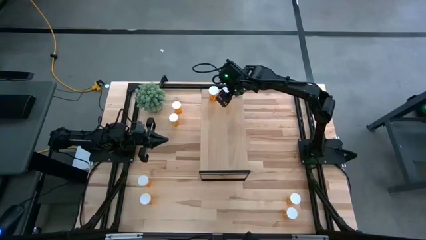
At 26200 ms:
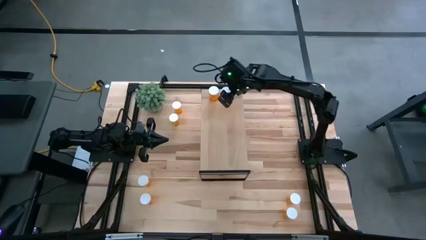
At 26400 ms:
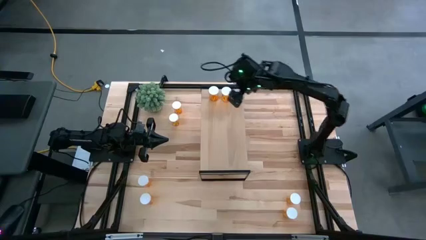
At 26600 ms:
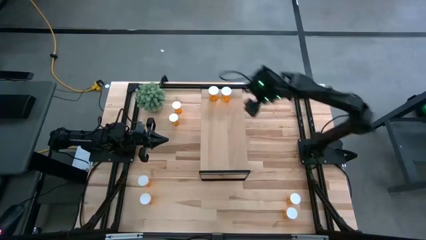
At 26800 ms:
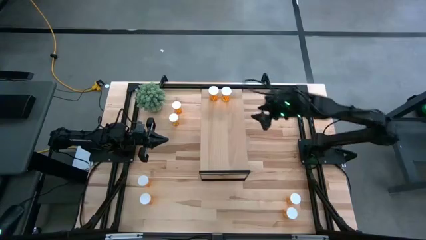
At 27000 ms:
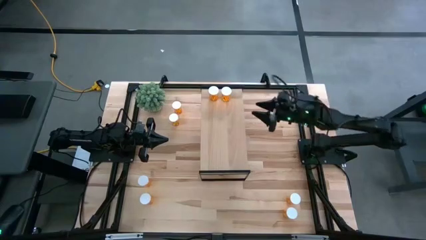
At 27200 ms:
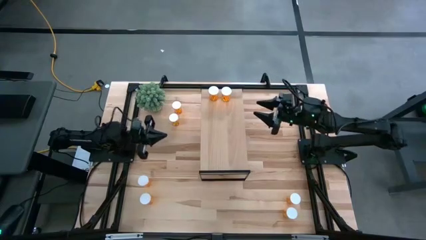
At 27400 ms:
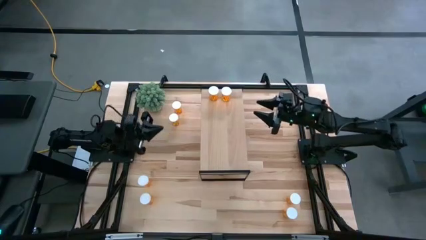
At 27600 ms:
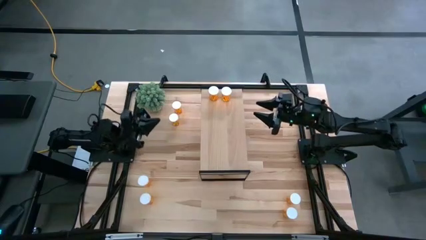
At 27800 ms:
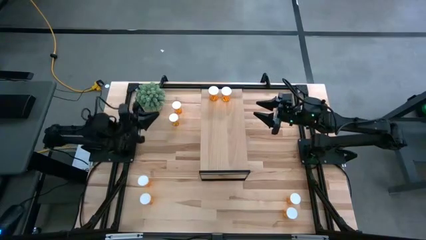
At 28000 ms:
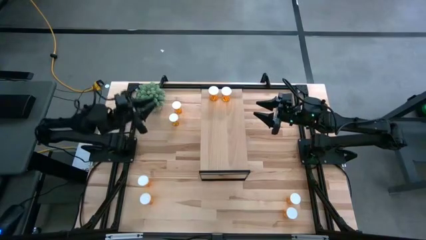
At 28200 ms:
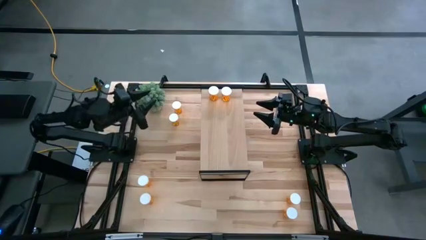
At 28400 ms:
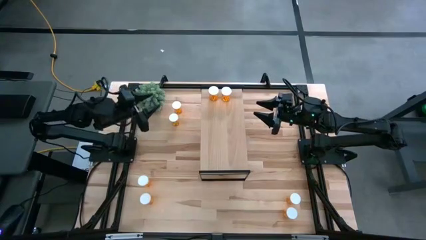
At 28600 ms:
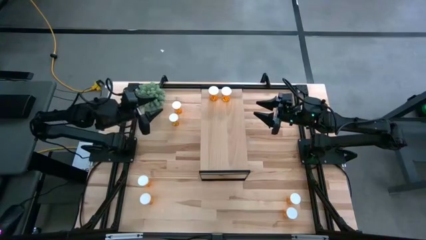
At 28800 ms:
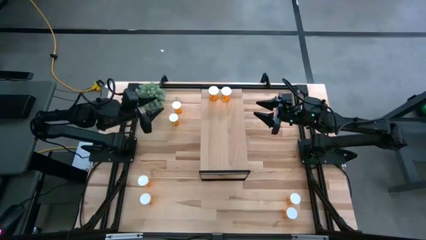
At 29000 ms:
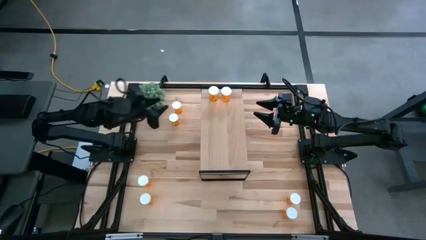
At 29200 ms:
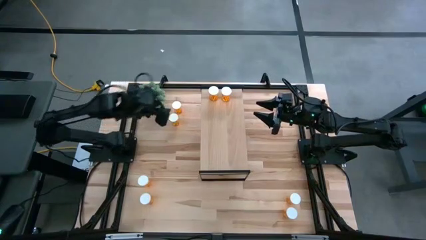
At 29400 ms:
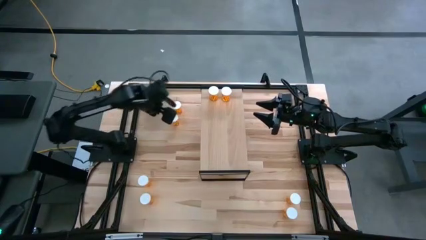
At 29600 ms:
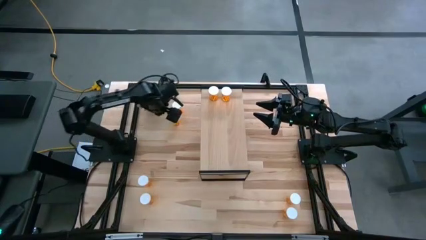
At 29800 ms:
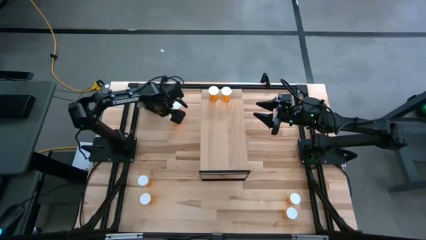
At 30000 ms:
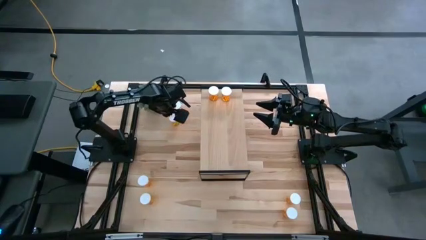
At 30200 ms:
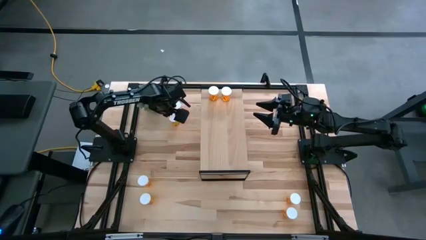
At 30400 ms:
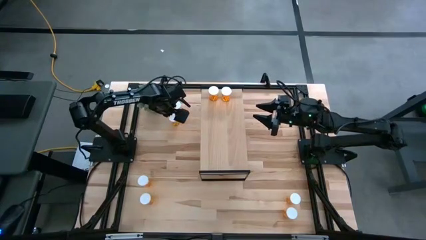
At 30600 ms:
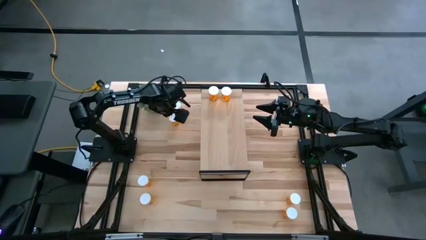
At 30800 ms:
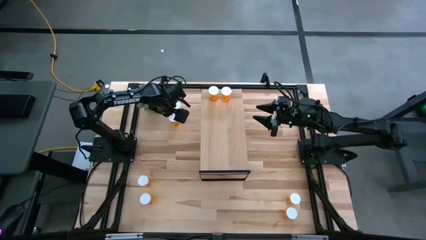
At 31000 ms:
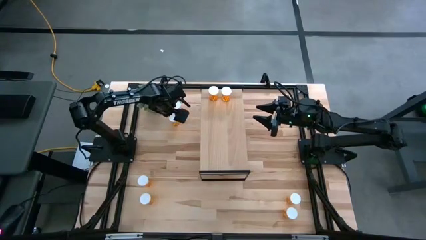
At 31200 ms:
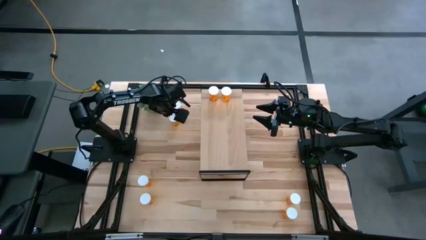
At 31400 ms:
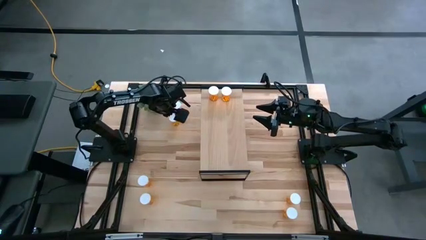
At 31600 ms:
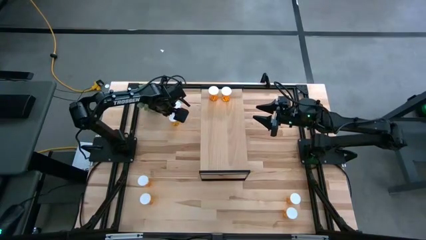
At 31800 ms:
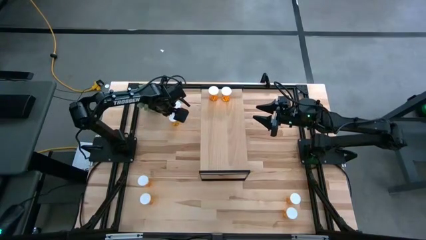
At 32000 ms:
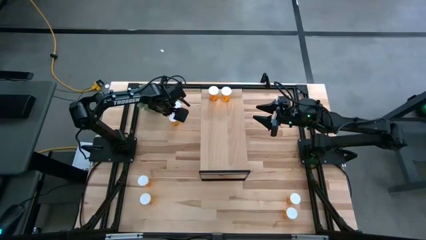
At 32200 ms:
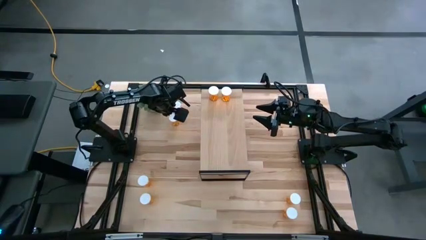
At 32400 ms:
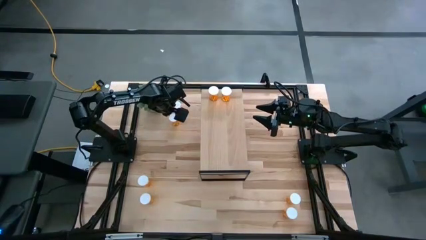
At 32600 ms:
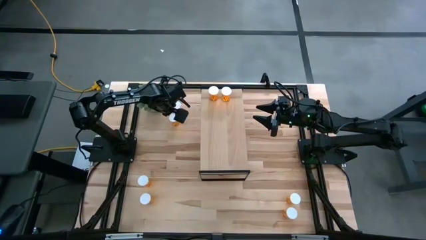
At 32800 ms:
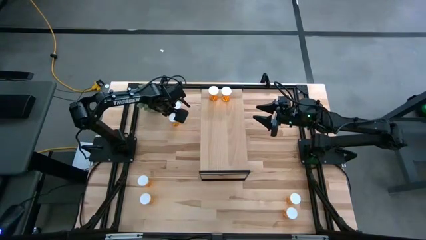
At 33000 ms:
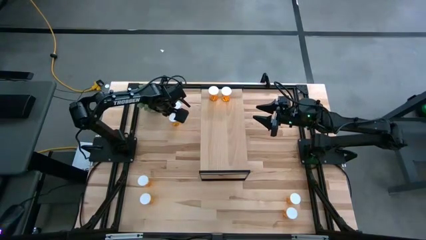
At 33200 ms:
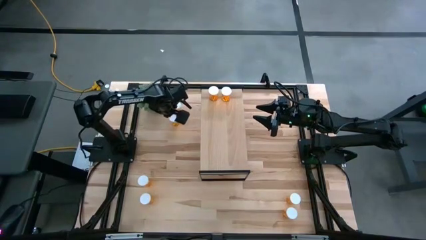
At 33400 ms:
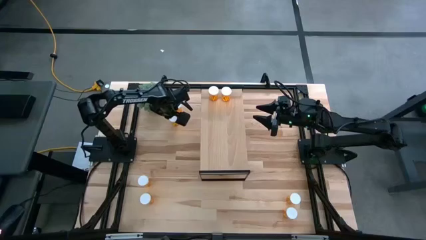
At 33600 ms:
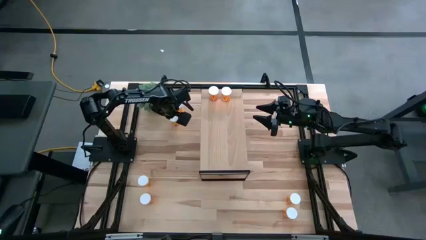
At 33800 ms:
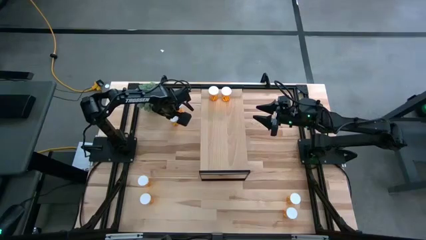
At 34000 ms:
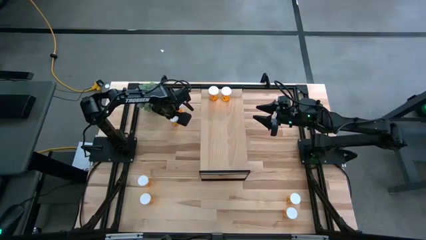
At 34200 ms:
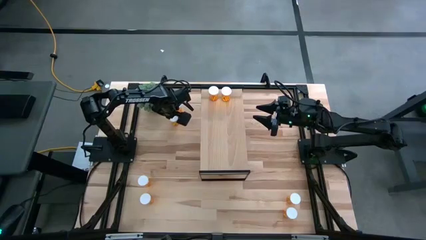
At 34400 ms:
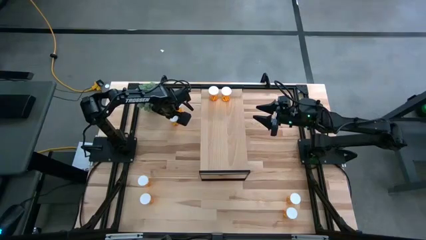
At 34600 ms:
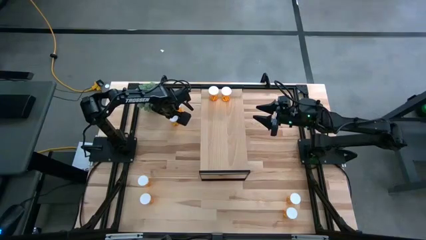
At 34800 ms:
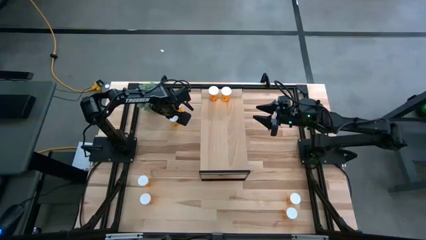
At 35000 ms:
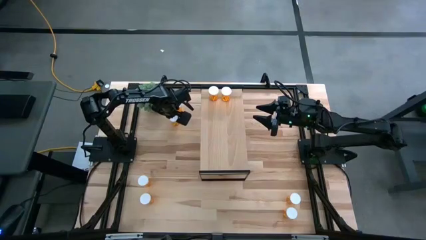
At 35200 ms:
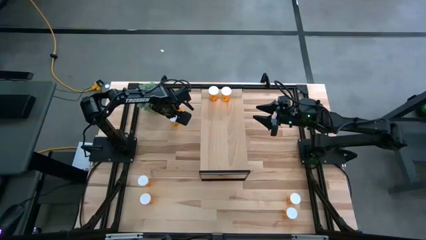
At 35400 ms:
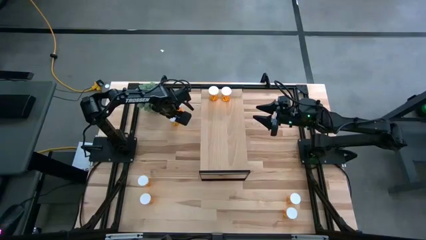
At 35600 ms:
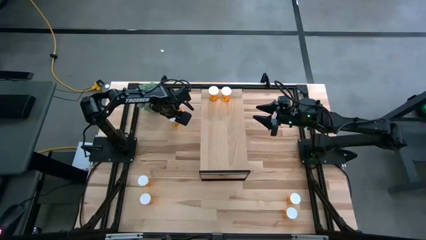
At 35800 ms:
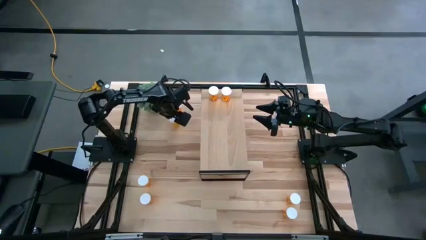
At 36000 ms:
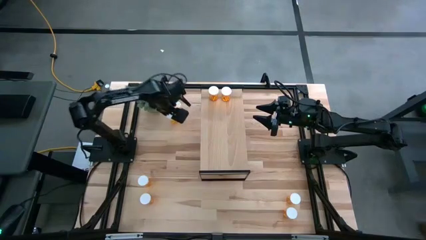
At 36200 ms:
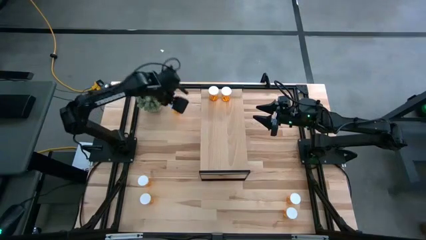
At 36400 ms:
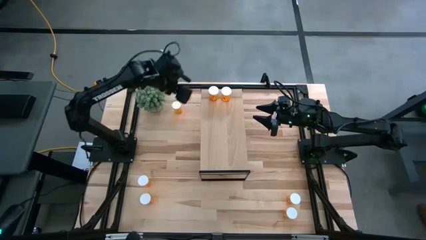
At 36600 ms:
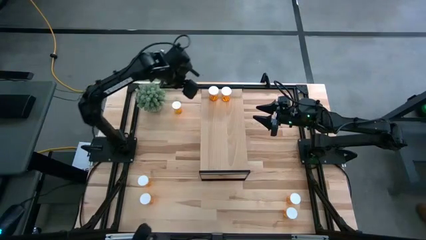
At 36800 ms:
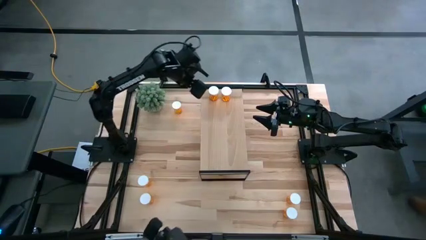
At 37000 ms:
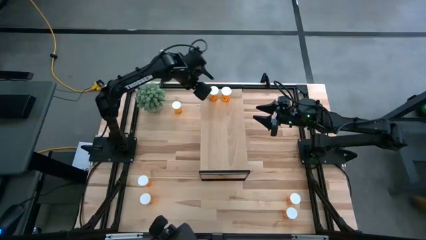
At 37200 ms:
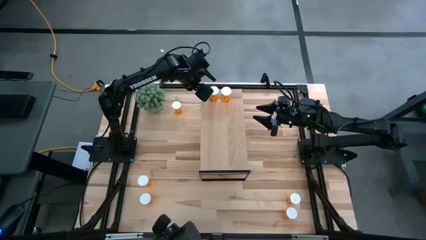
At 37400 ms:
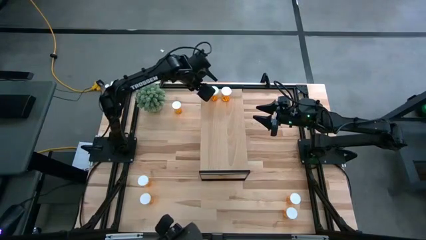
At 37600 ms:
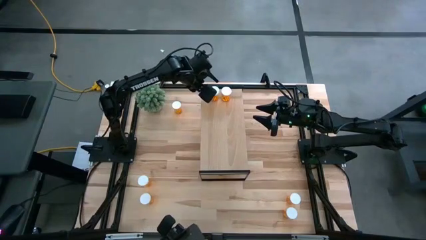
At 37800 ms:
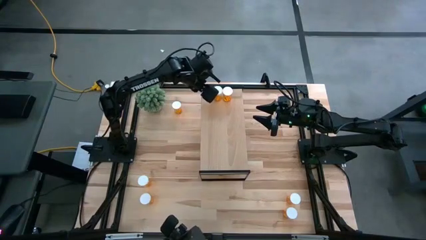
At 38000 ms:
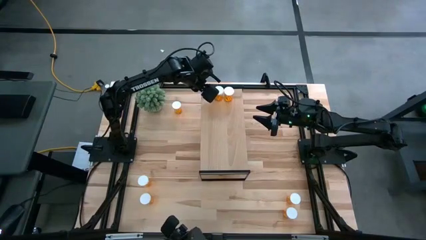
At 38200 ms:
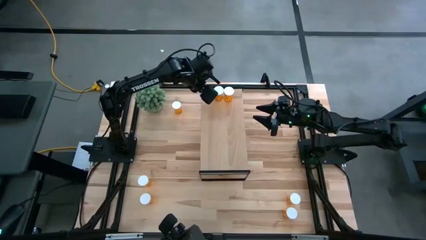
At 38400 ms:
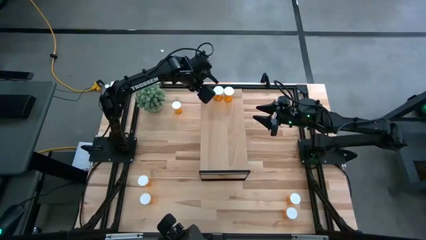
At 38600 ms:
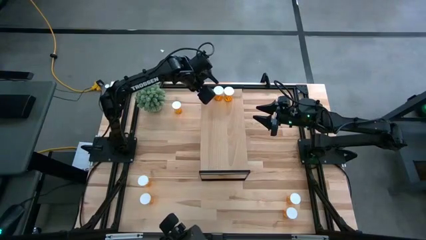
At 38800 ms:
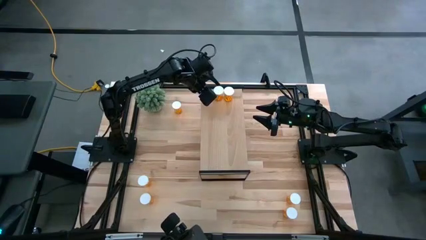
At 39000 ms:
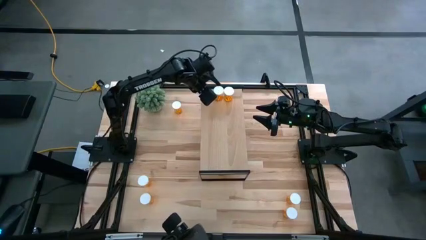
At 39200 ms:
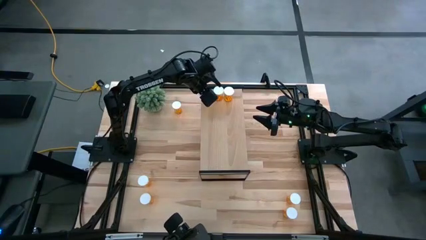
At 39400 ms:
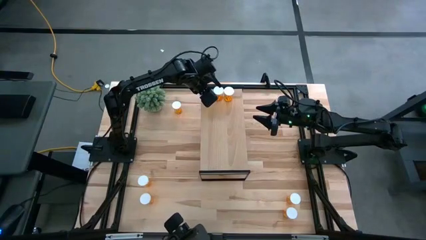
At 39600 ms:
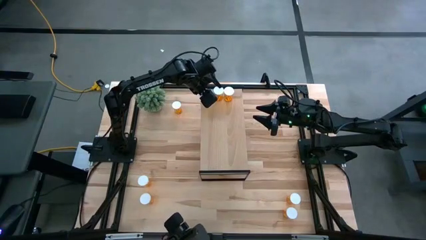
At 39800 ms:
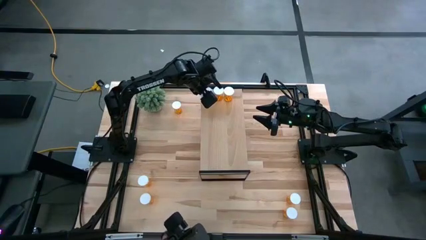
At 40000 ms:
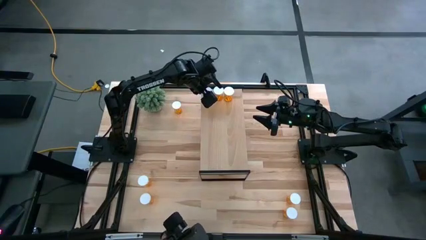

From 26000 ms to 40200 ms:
Task: Pick and place medicine bottles onto shelf by color
Put the orange pill bottle on the shelf

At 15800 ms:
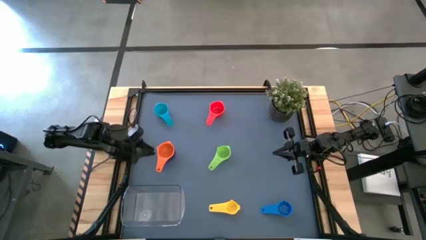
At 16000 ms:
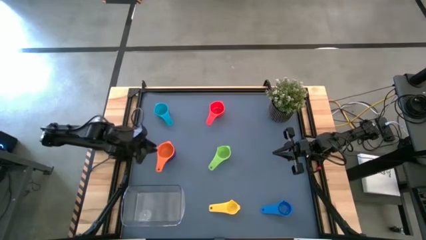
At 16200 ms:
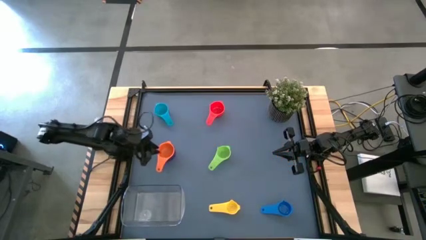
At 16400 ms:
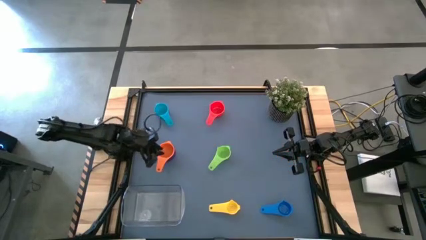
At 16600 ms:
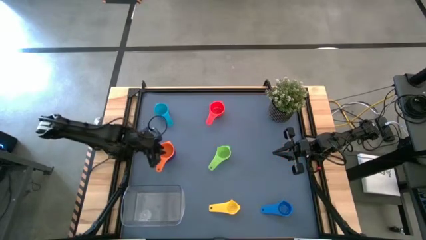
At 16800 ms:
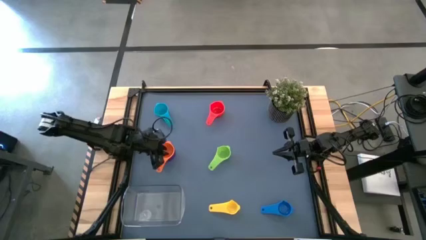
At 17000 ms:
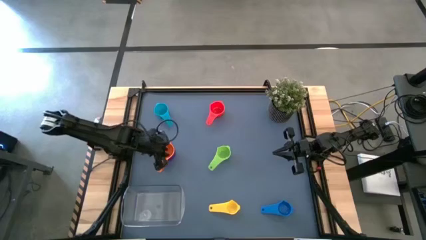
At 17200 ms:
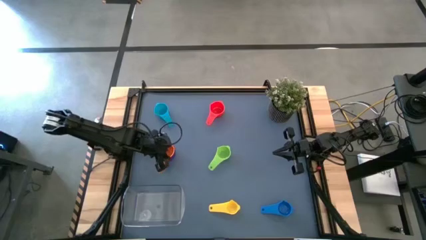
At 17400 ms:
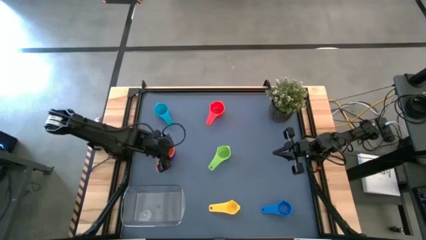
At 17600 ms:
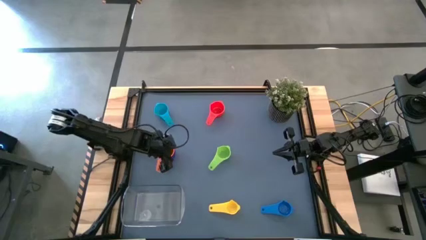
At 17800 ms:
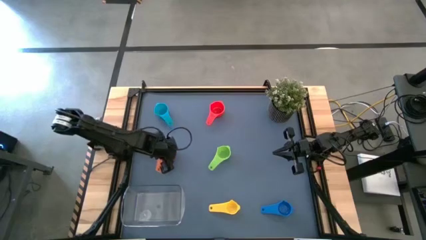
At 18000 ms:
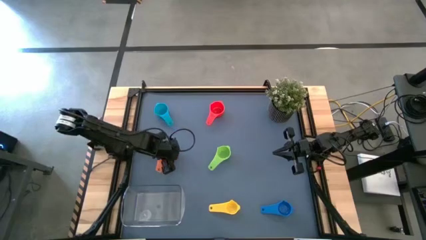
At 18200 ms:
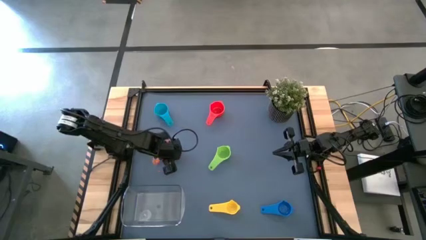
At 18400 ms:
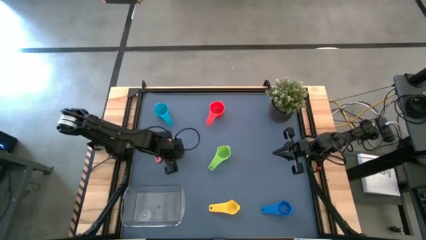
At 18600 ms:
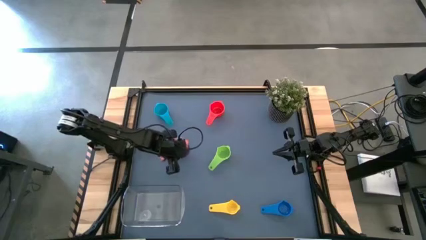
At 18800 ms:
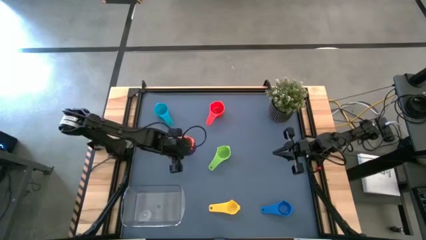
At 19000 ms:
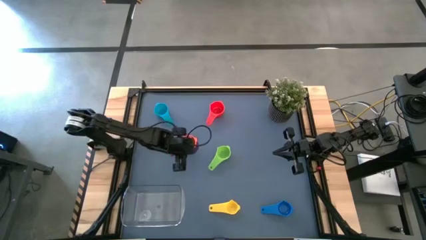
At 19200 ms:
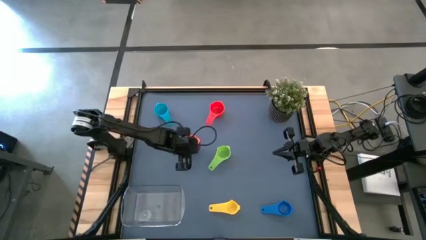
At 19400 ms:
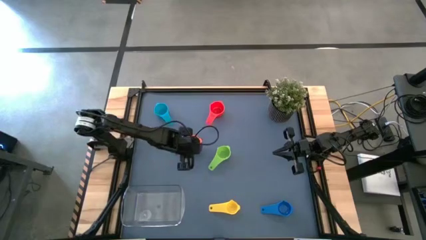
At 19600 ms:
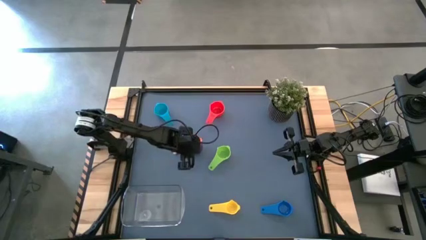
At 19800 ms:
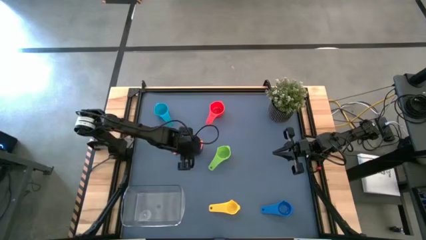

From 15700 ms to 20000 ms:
Task: Nest measuring cups in basket
Move the nested measuring cups to the center of the table
